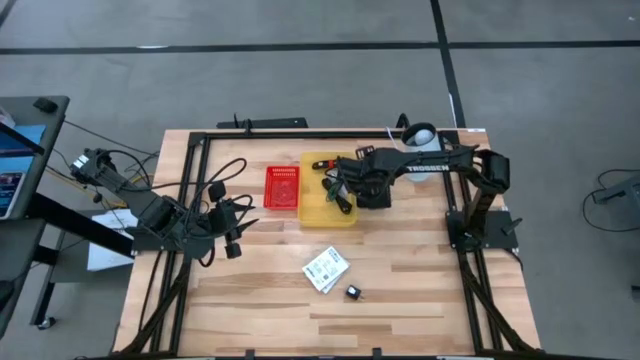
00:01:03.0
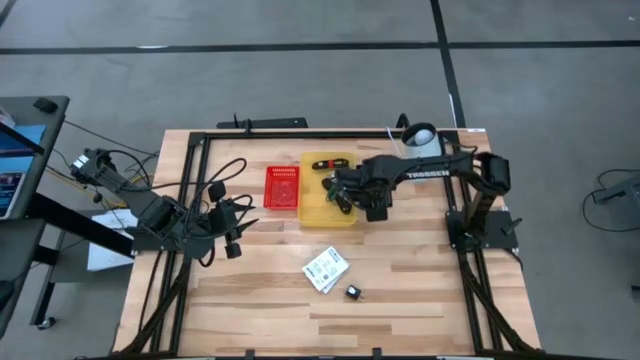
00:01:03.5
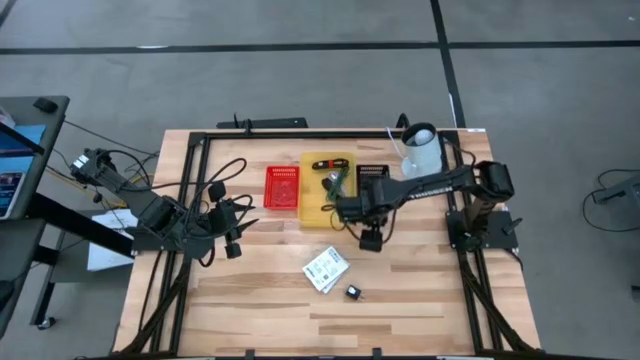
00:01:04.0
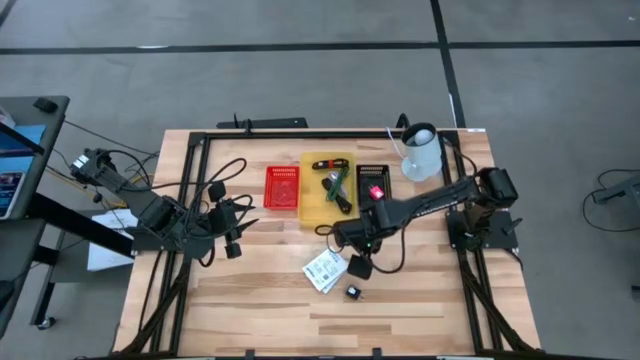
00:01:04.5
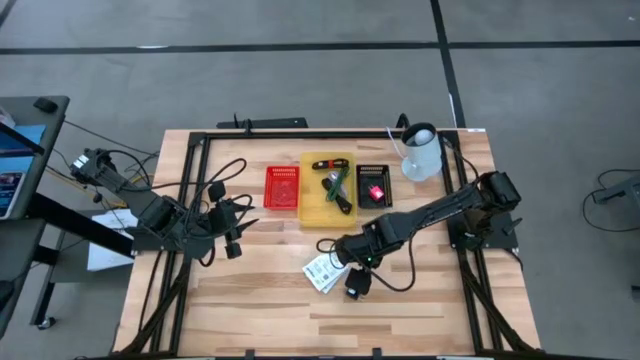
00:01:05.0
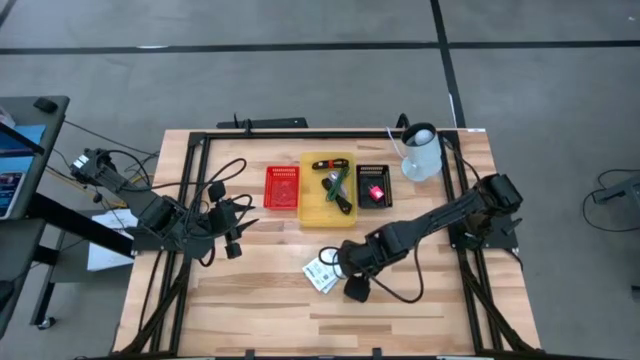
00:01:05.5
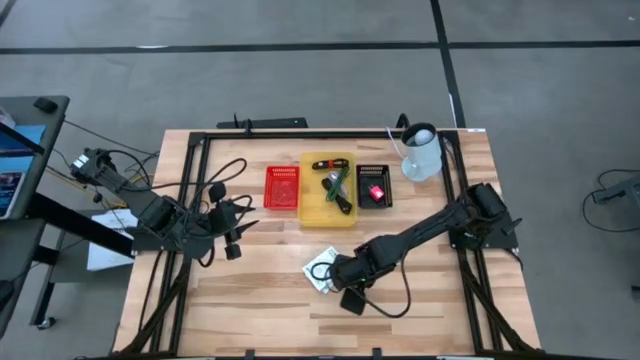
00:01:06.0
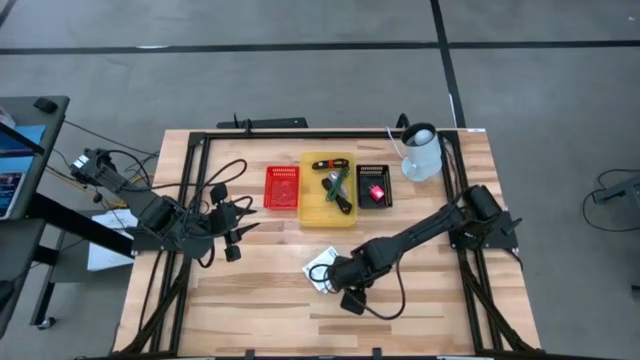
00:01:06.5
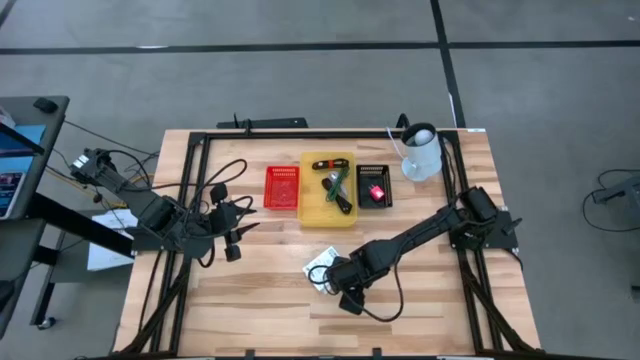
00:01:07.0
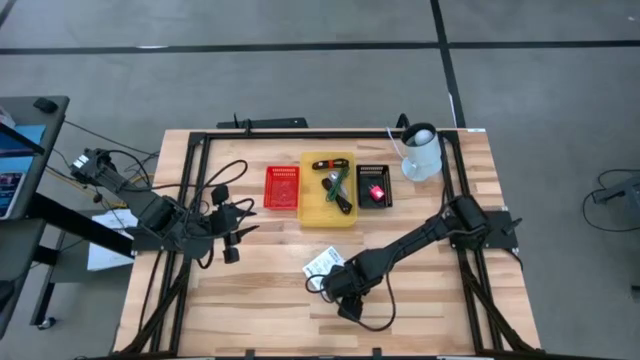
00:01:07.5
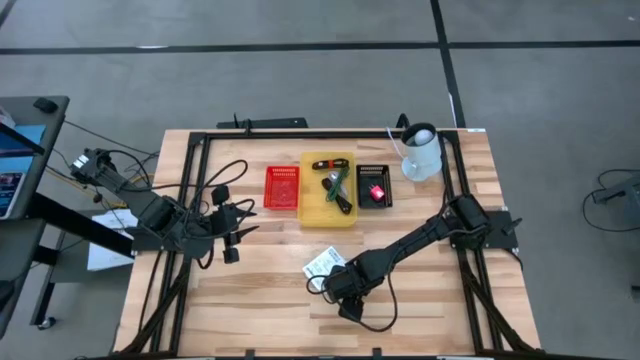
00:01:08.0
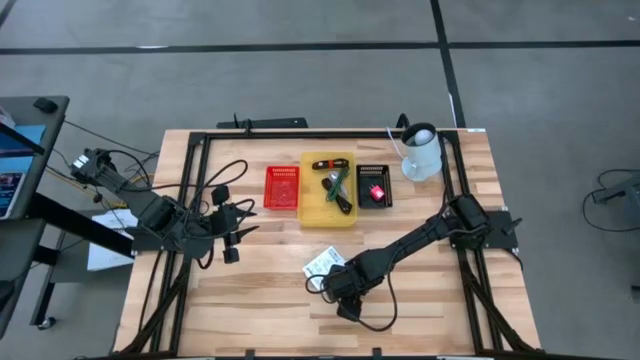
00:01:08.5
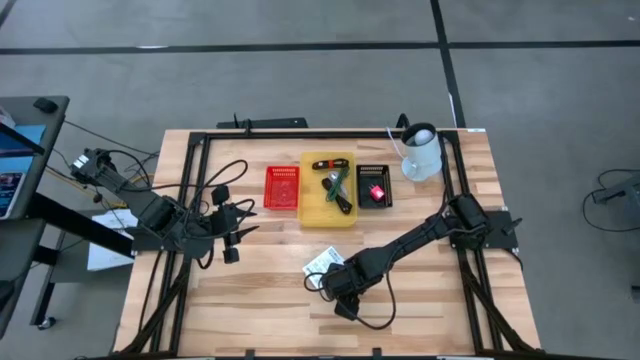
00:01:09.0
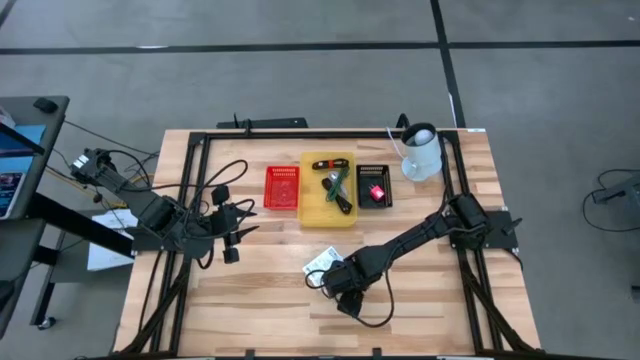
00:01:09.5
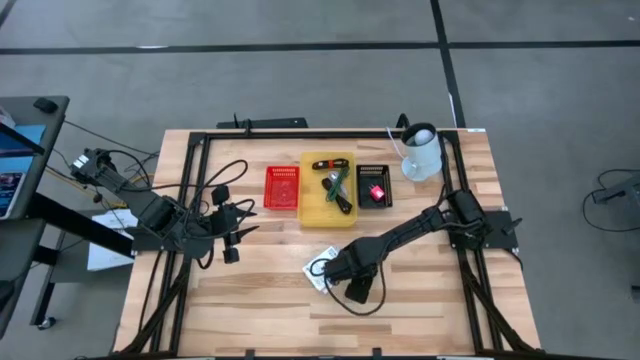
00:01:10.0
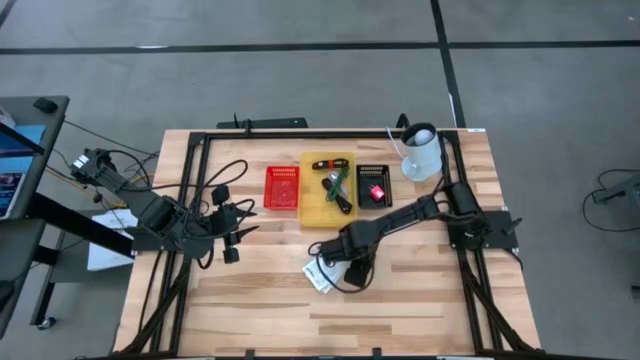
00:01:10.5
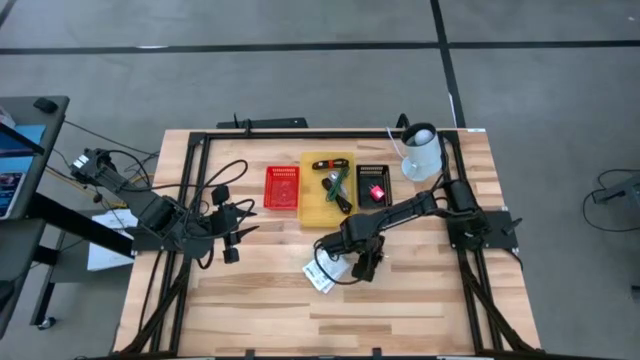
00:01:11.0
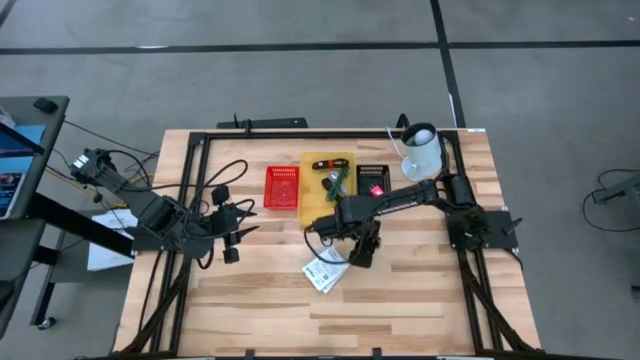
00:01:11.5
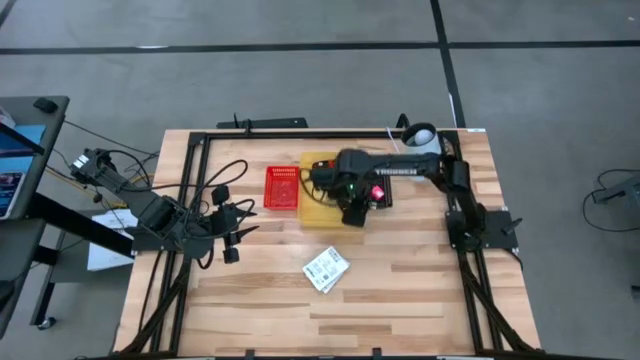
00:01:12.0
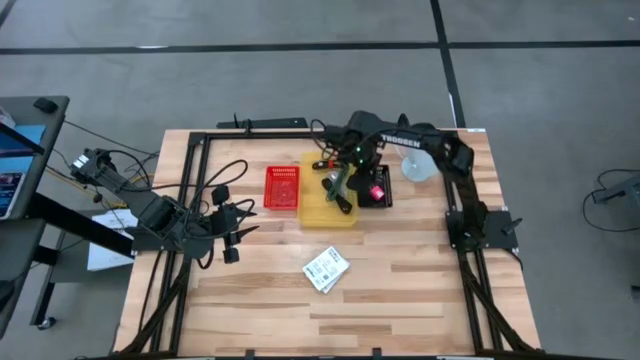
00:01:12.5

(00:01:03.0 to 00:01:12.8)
Task: Pick and place items into bin
Put the black charger adapter in the black bin

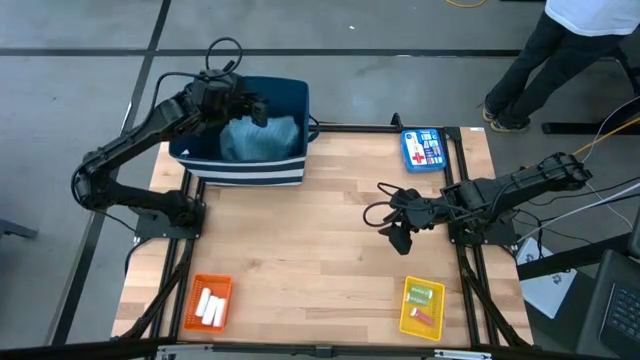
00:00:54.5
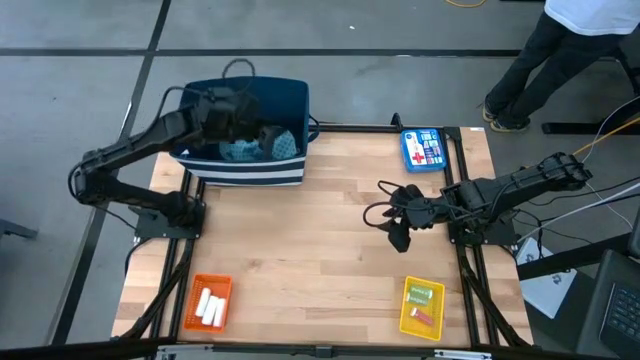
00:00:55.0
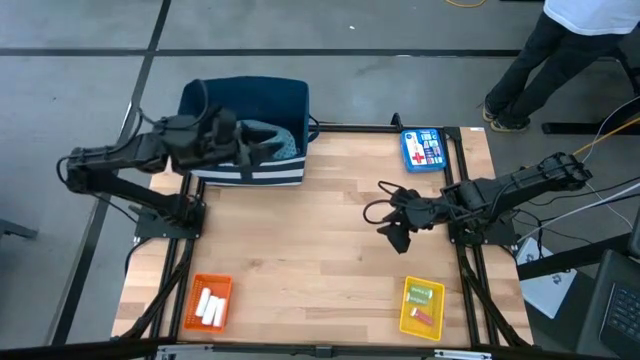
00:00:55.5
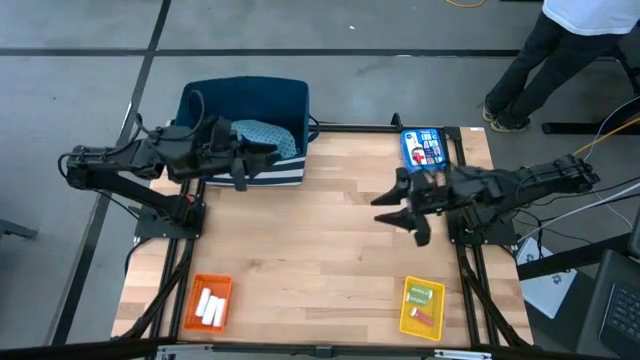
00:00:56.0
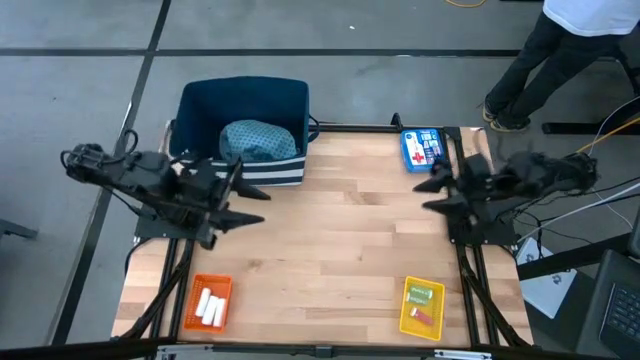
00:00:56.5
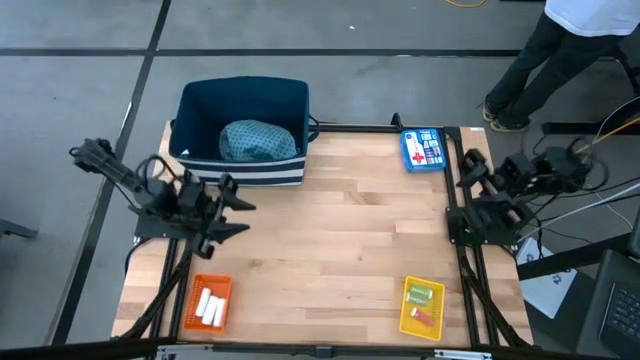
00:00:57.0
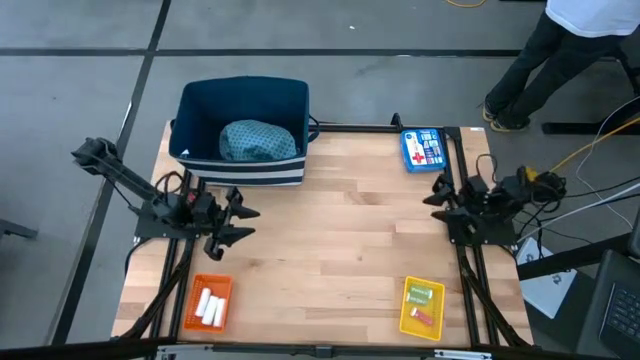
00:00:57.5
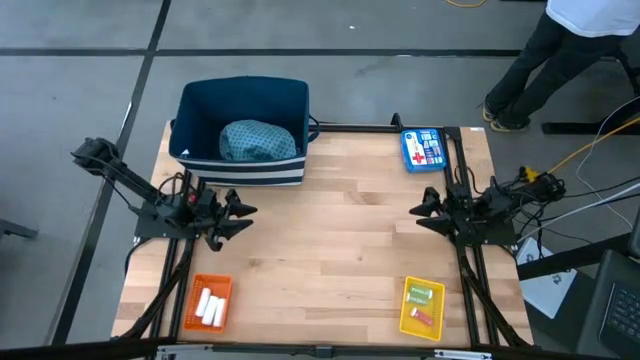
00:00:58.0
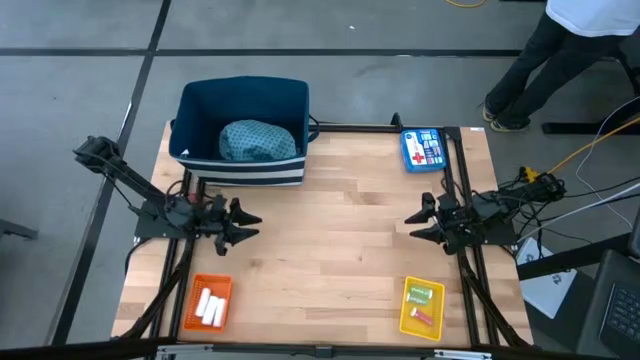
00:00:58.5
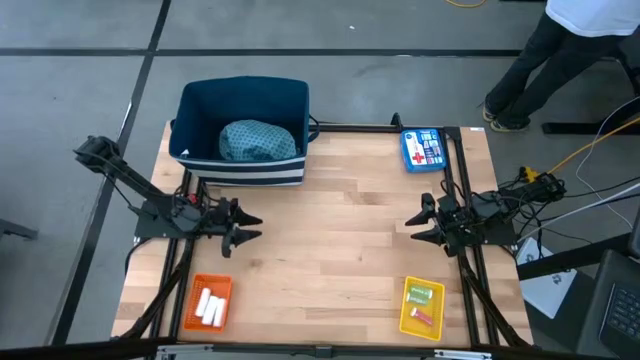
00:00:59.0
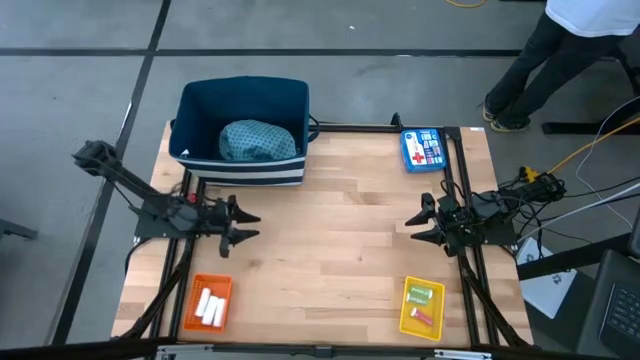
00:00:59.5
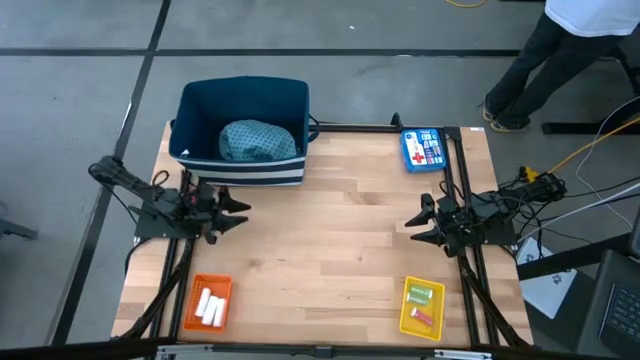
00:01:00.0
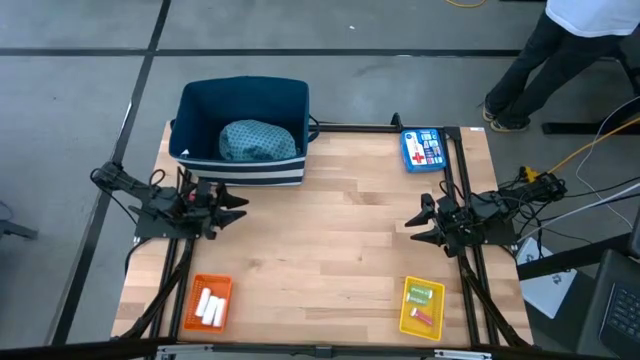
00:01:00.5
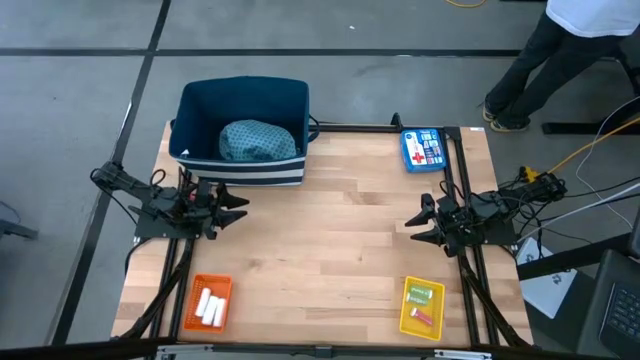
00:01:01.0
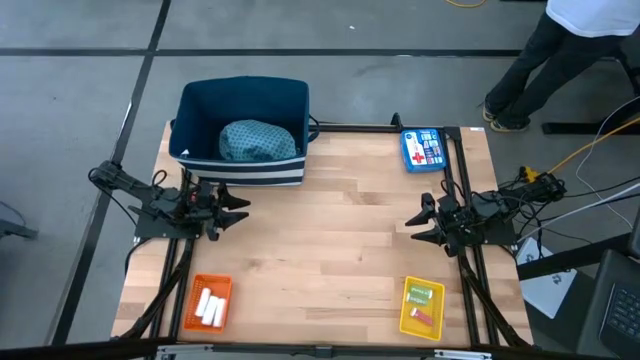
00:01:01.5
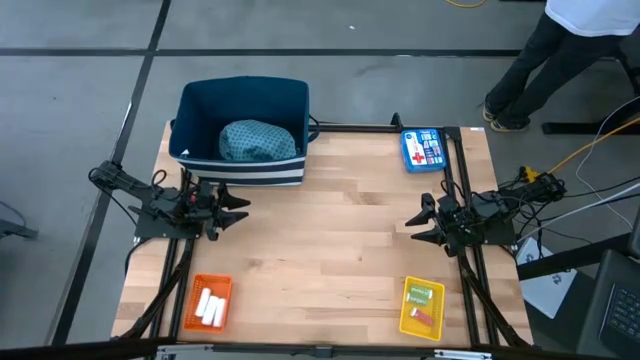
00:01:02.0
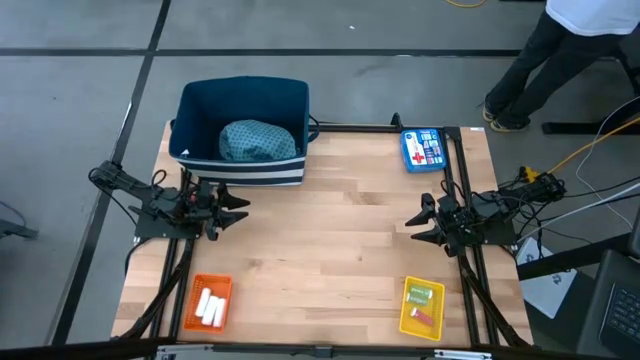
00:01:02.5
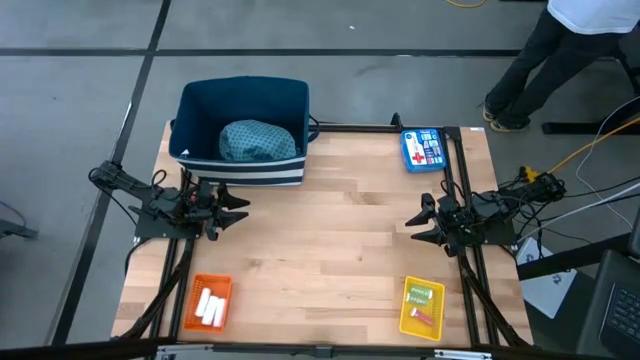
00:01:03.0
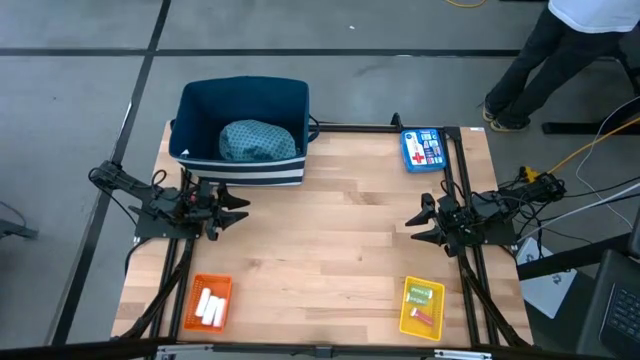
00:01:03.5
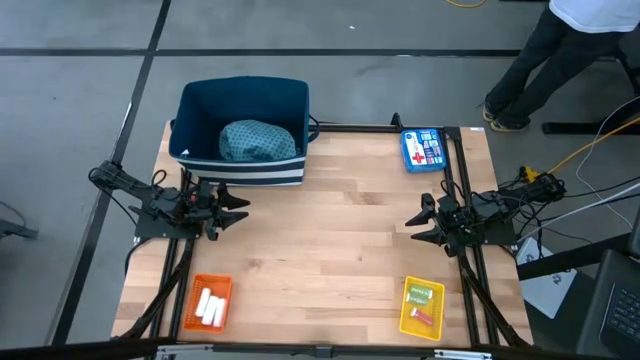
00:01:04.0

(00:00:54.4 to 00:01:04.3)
Task: Pick & Place Medicine items
Return to Home Position
